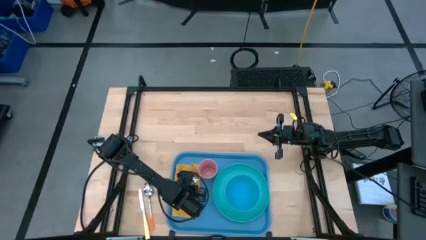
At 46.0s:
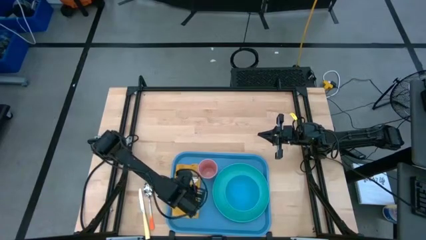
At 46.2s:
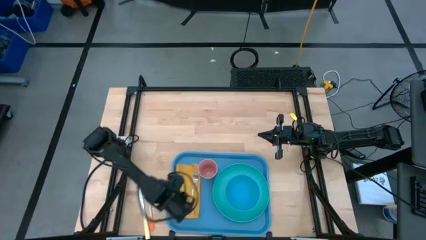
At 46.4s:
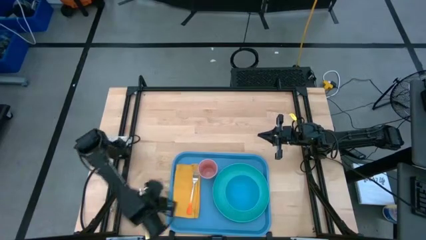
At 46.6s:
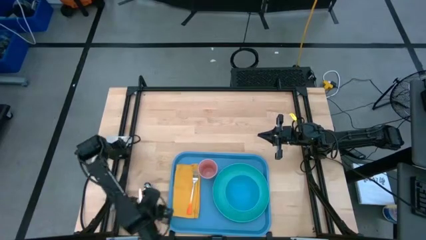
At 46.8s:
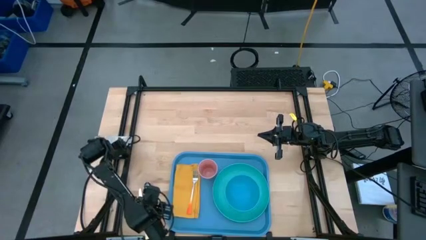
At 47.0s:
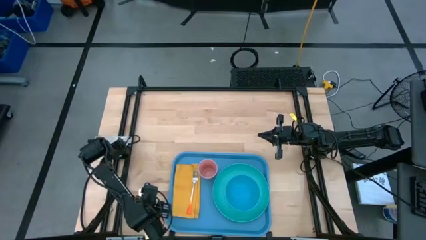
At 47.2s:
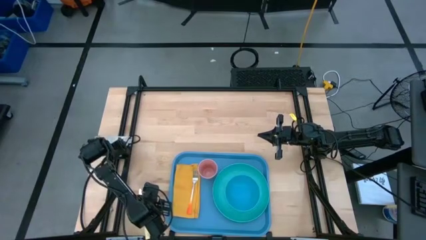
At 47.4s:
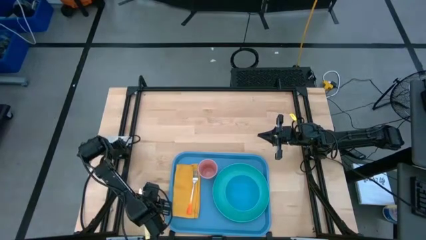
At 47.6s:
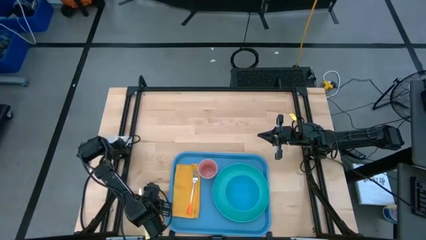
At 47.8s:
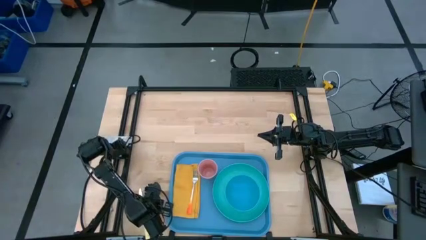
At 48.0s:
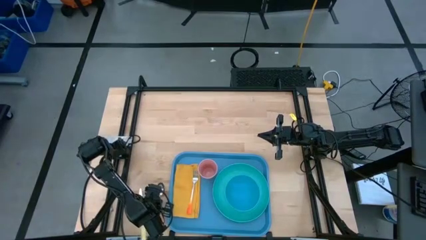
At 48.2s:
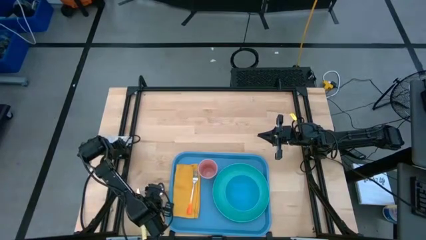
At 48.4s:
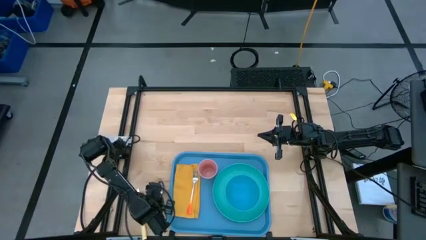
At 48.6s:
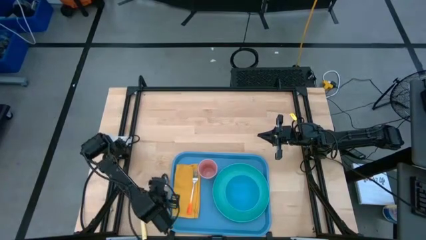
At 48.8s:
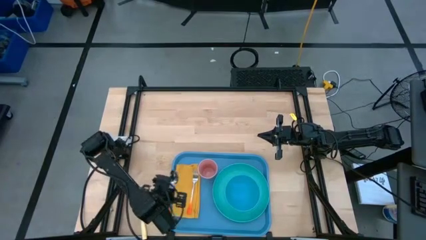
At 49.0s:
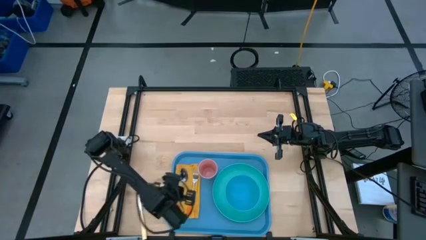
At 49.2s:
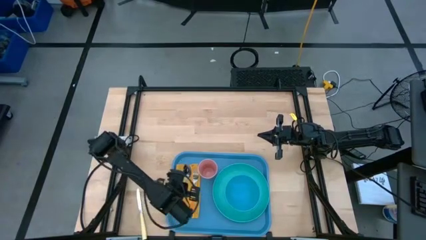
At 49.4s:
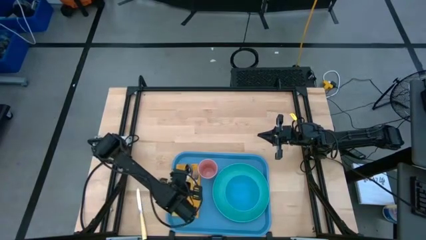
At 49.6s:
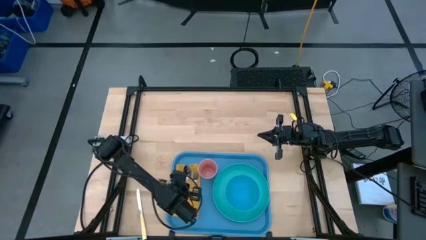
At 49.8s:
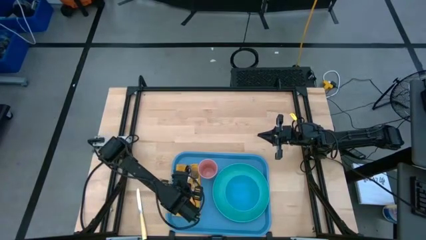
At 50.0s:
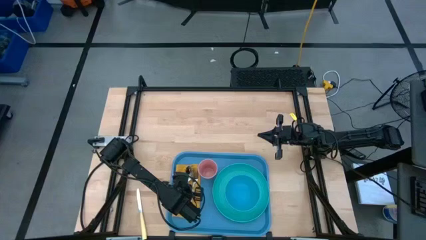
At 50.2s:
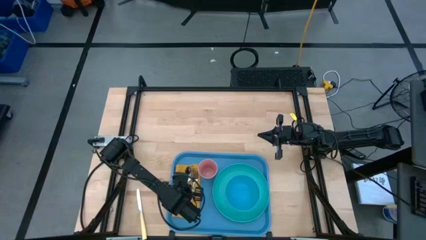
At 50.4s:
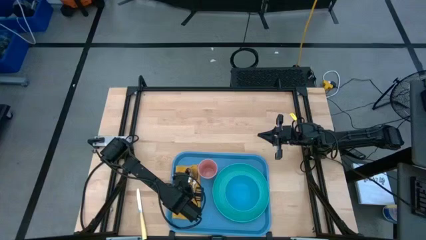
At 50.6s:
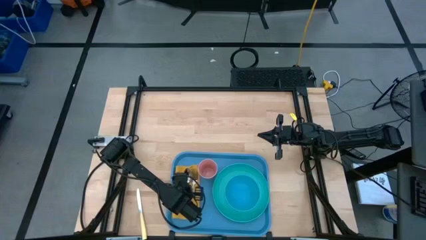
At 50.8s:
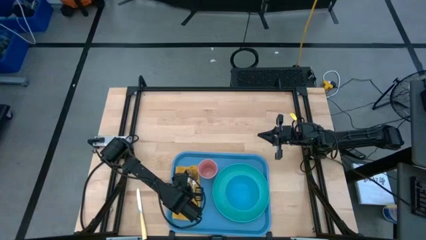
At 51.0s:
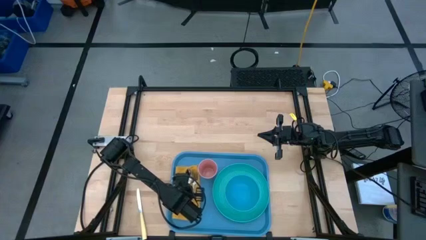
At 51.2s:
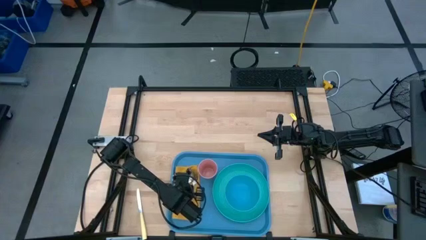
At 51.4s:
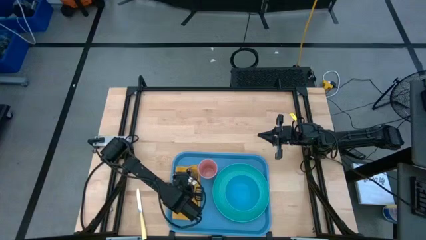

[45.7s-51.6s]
Task: Set up tray
Put the orange spoon on the yellow napkin

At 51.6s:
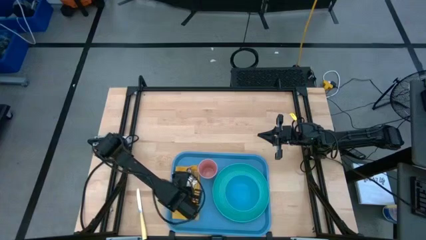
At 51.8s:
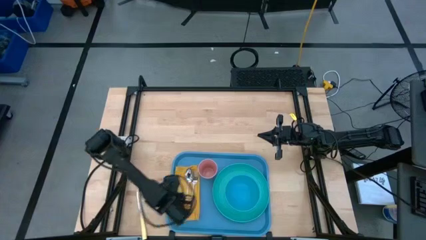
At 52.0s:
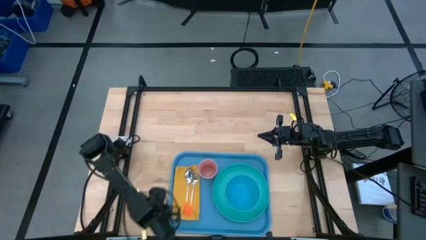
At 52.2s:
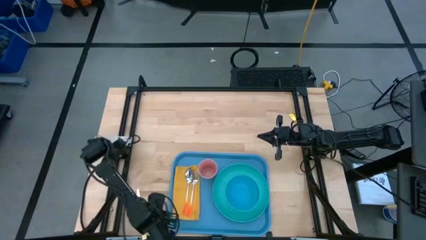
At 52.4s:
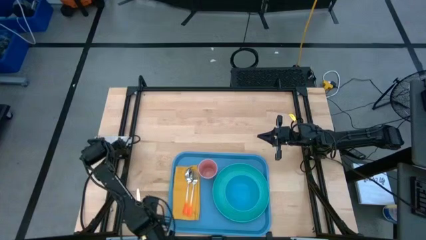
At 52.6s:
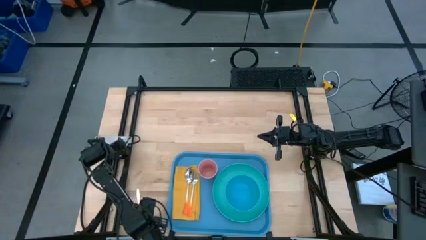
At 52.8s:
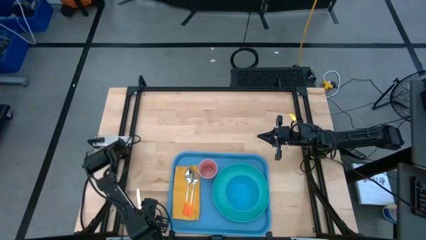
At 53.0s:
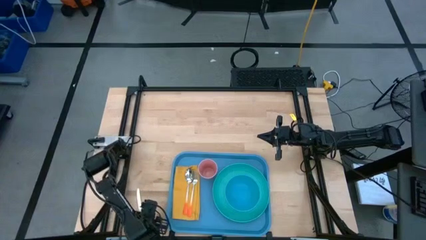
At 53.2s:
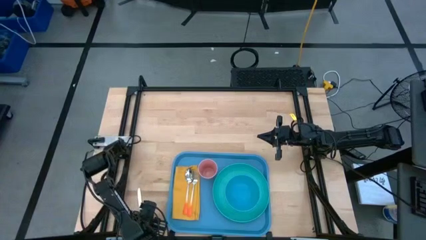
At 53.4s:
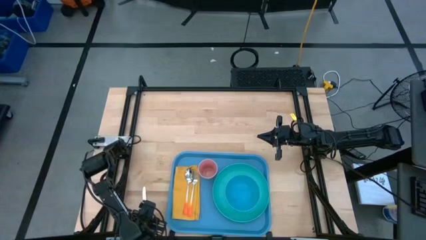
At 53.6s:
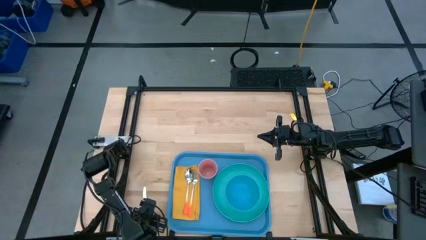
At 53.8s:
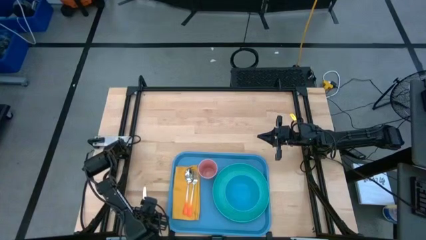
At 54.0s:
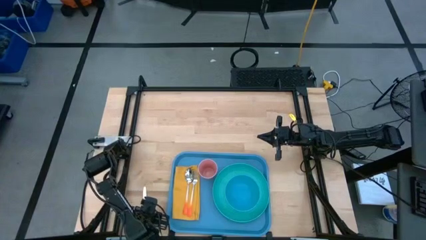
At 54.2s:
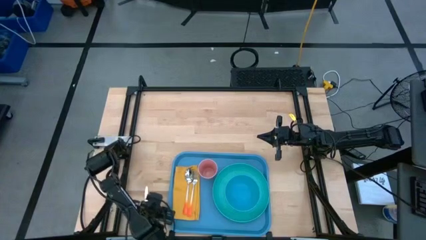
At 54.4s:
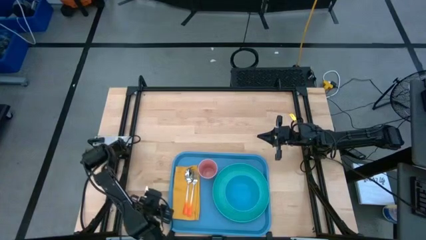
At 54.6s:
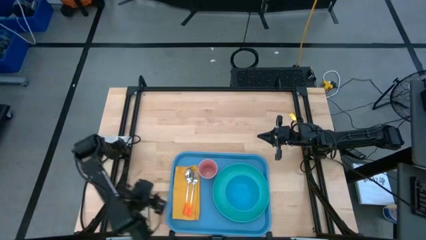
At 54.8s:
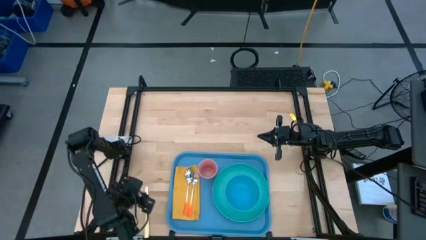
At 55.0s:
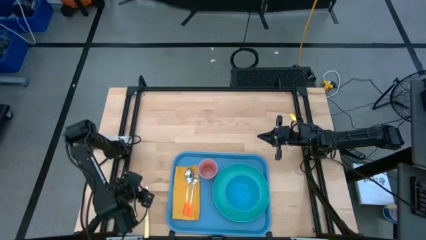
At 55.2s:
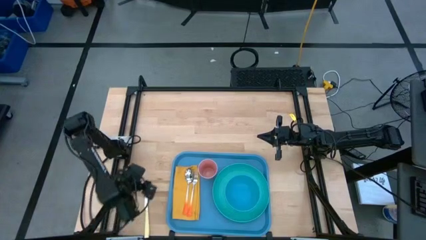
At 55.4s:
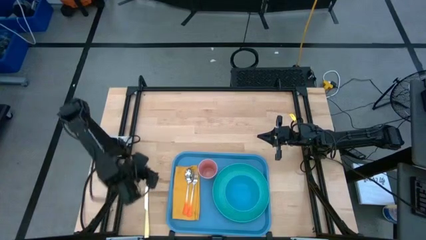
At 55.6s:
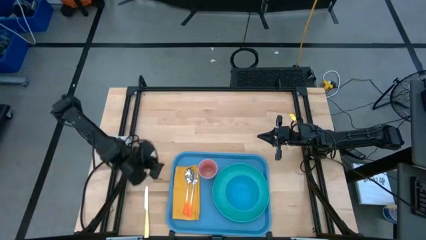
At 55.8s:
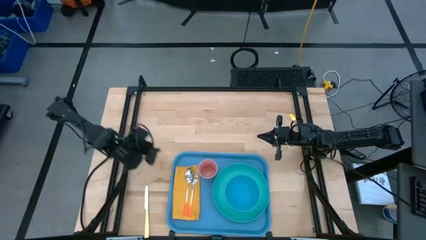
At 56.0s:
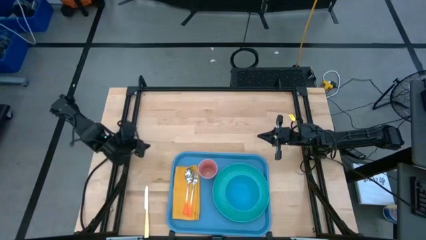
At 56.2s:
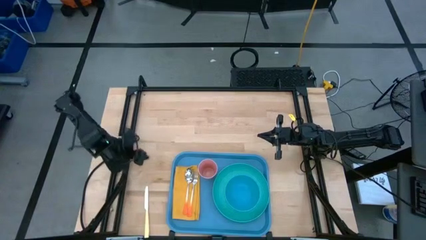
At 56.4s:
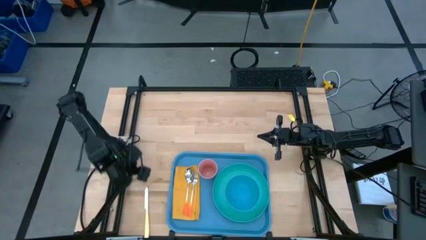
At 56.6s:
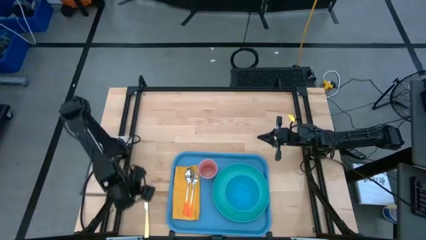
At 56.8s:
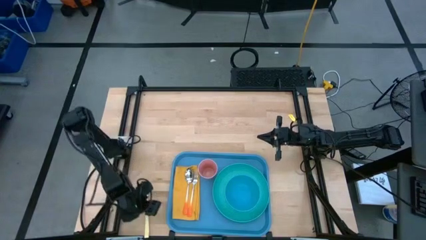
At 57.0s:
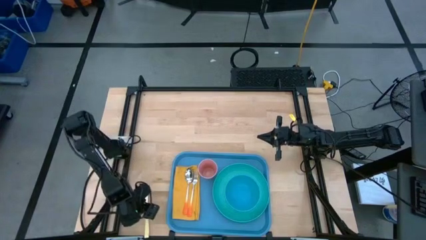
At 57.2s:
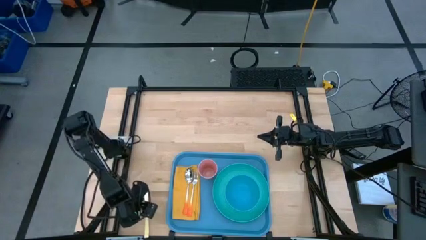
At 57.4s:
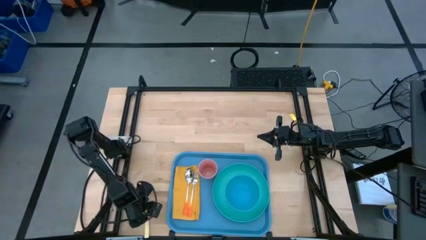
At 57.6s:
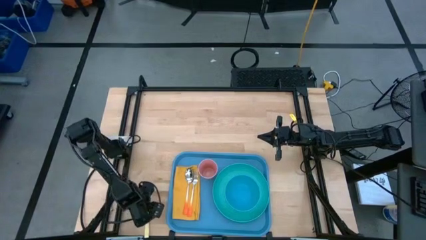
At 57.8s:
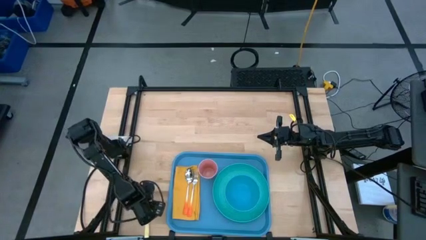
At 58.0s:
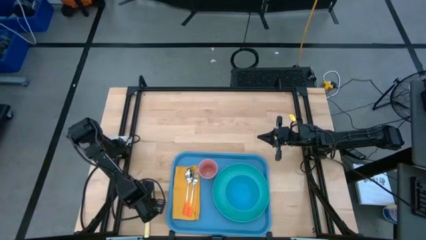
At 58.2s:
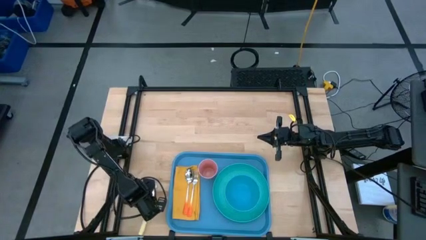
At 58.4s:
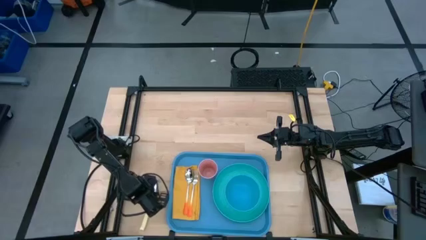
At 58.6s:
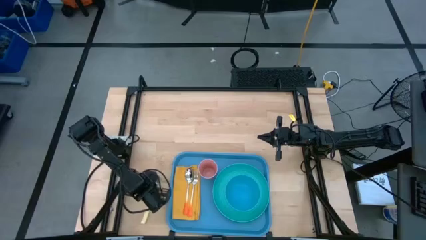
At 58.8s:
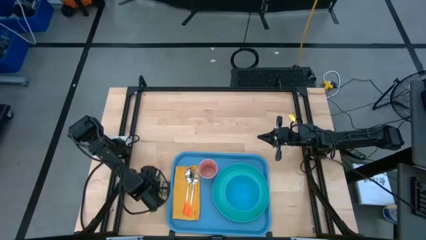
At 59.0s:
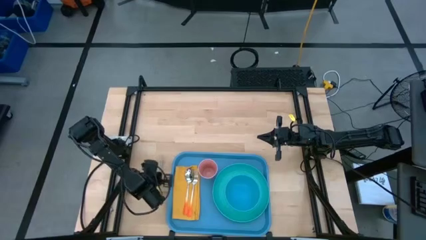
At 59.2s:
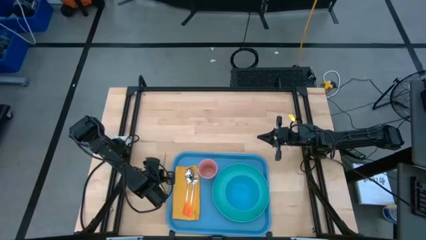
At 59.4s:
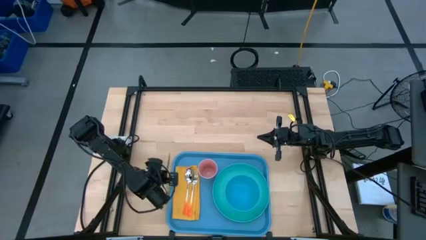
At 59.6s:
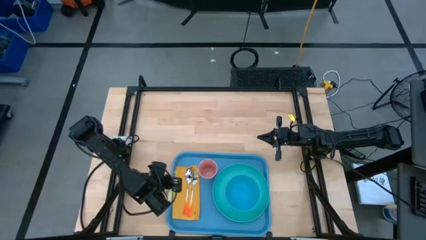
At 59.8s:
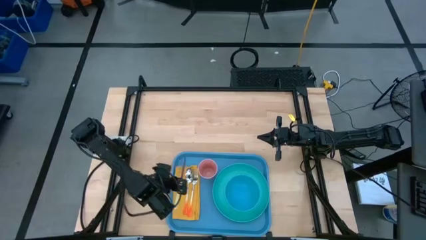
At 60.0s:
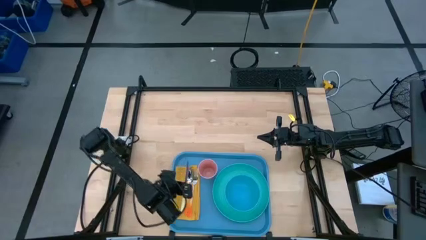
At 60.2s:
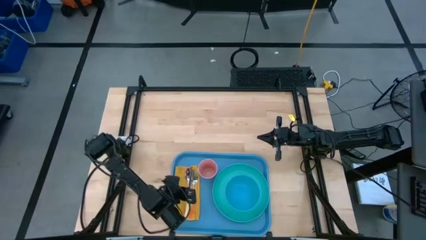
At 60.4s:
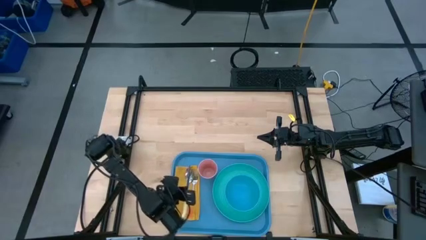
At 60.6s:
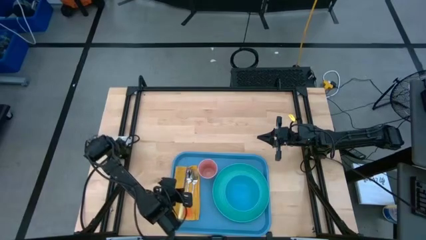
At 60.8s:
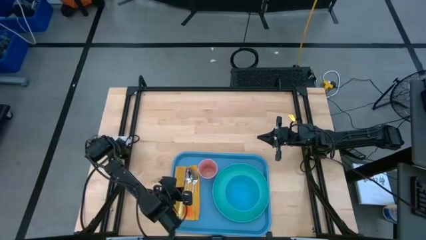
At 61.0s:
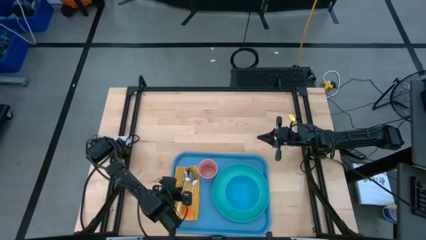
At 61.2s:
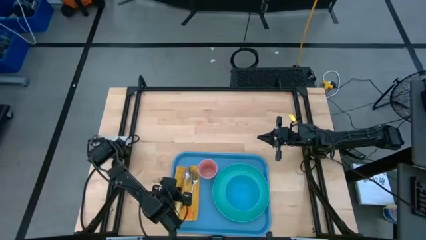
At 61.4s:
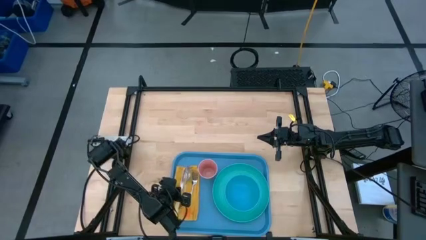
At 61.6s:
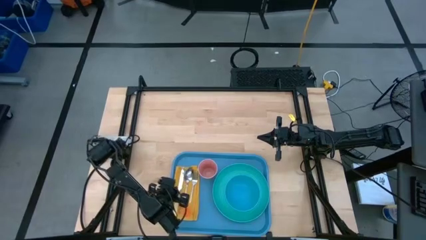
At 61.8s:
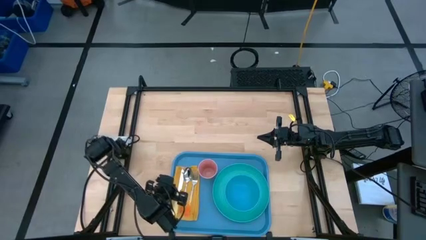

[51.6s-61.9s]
Put the yellow knife on the yellow napkin

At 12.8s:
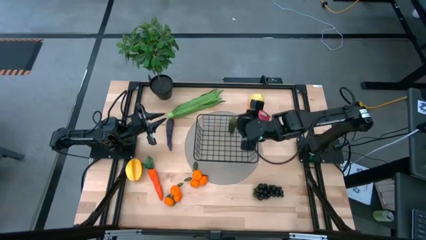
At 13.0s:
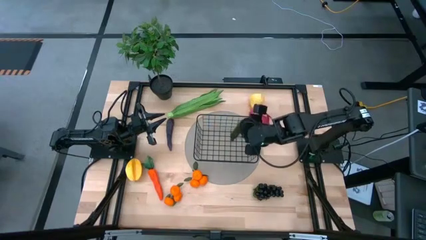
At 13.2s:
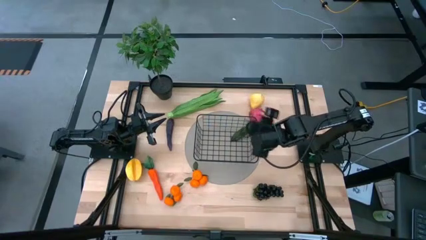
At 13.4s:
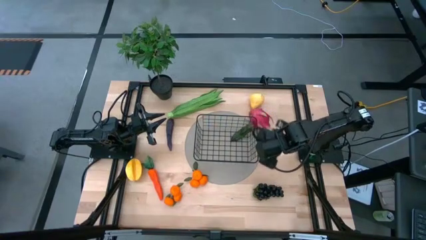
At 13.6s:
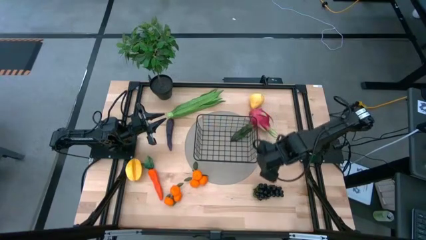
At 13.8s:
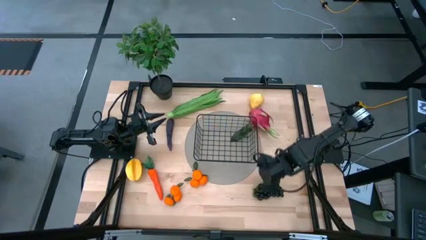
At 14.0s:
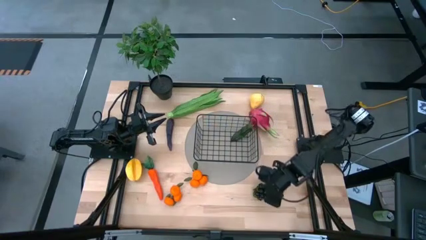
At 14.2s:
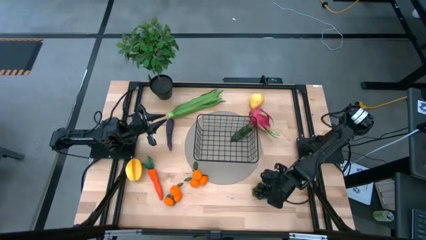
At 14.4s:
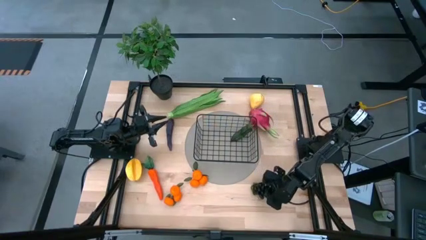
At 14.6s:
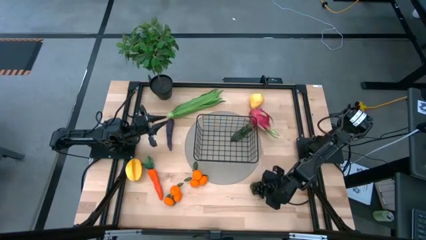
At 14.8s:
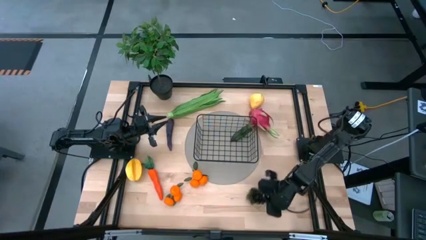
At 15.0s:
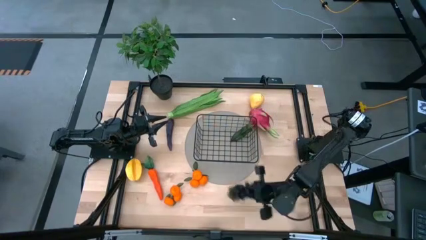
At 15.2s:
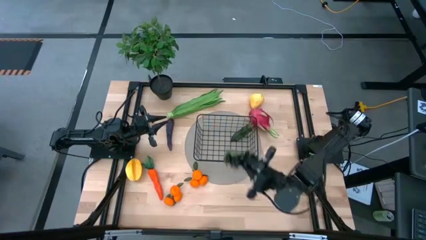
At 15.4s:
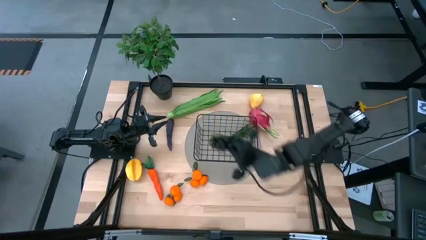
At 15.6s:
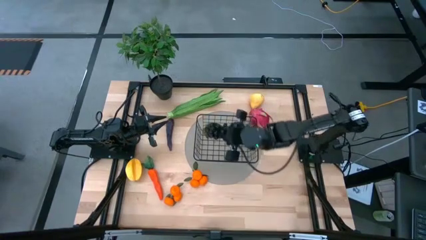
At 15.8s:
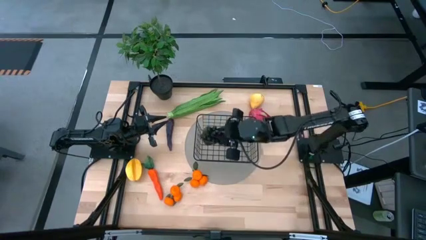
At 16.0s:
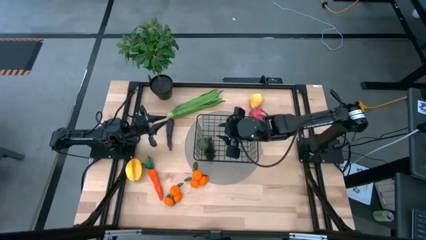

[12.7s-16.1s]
Task: Build produce basket
Put the black grapes into the black wire basket
